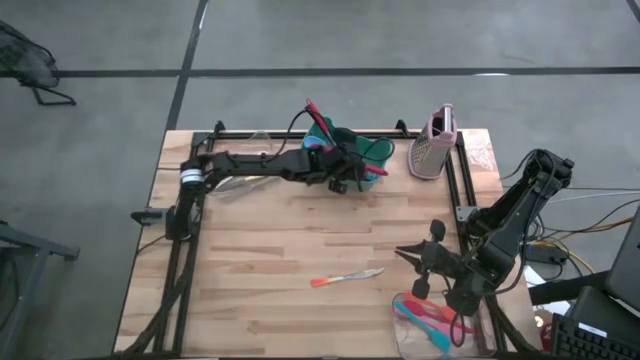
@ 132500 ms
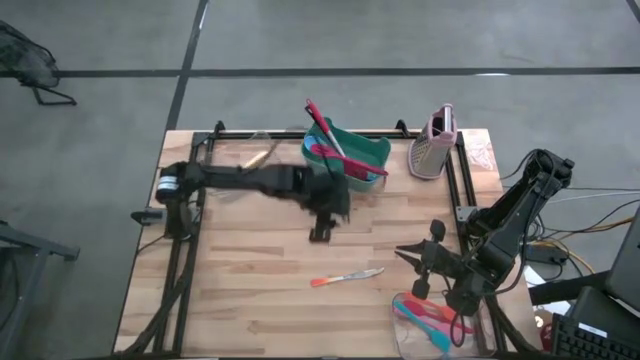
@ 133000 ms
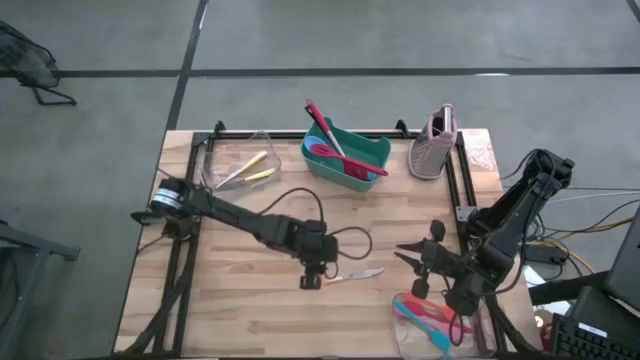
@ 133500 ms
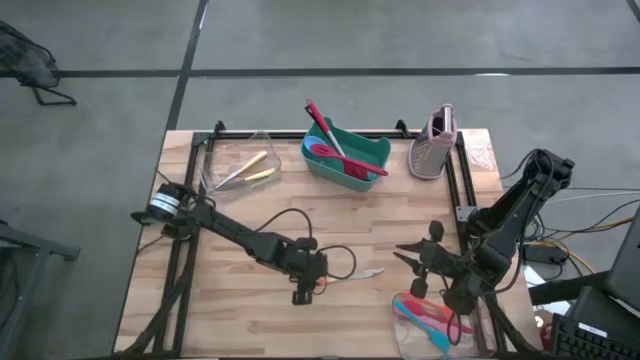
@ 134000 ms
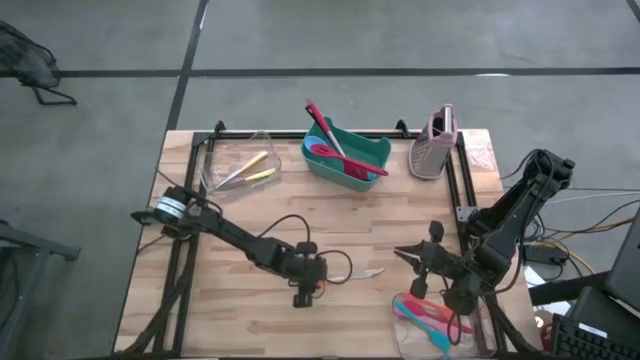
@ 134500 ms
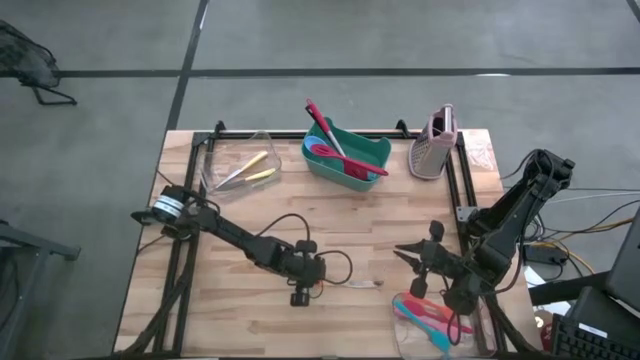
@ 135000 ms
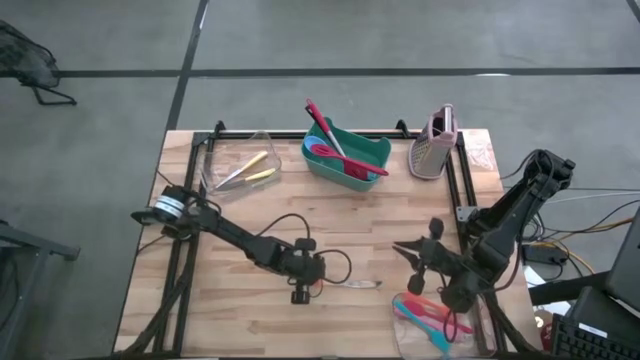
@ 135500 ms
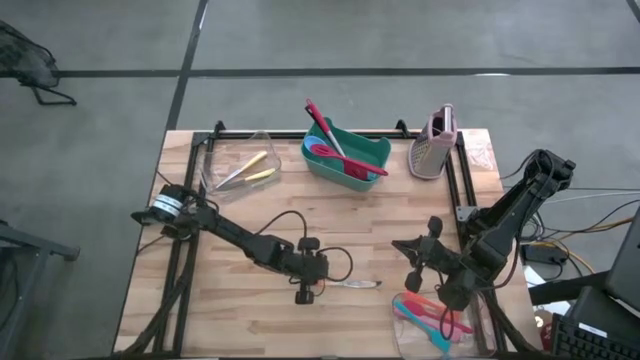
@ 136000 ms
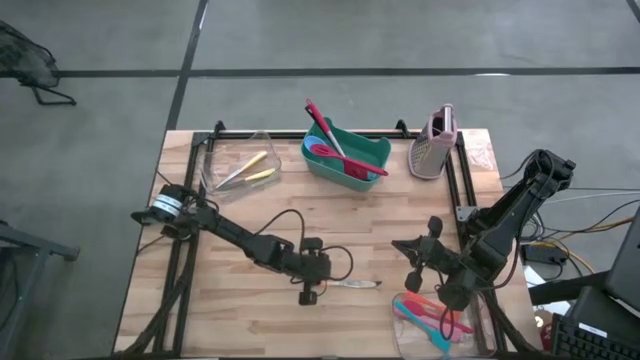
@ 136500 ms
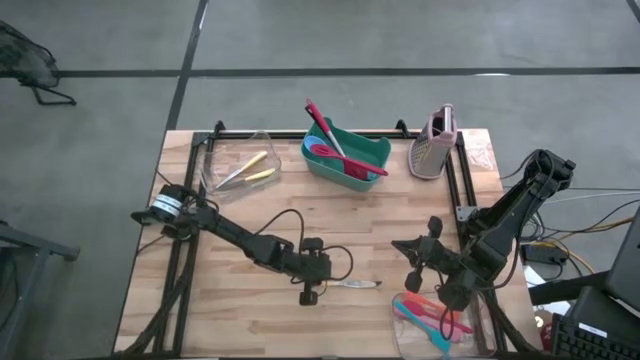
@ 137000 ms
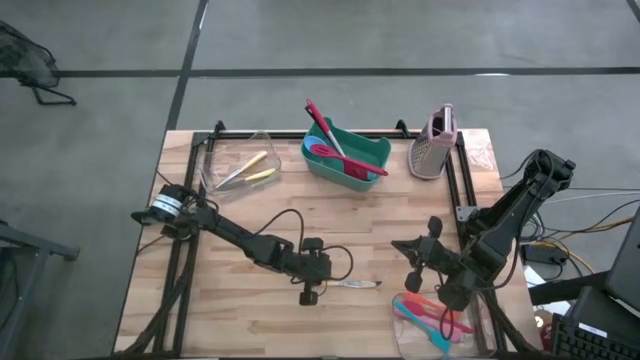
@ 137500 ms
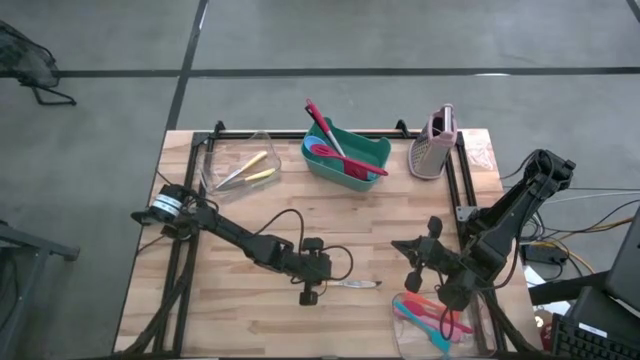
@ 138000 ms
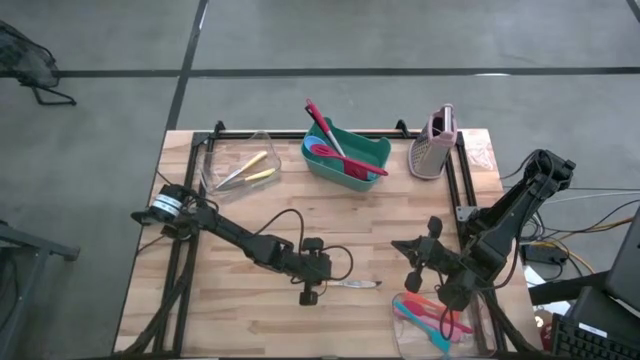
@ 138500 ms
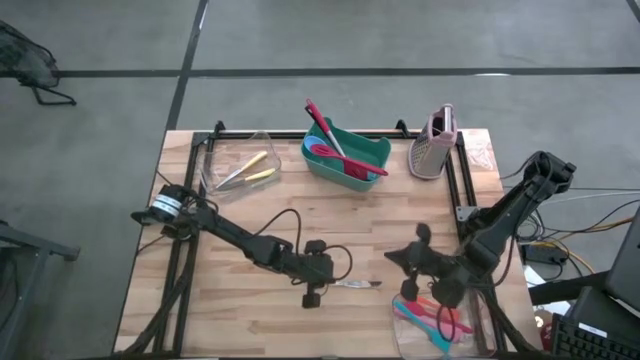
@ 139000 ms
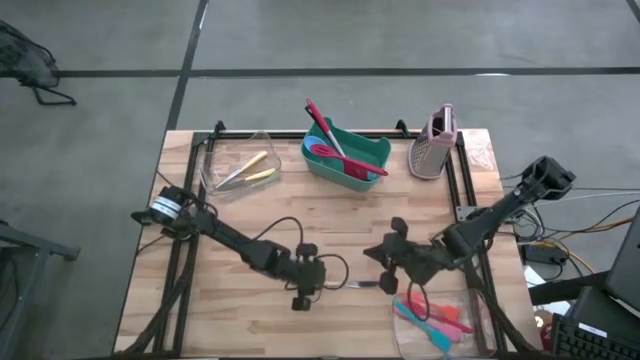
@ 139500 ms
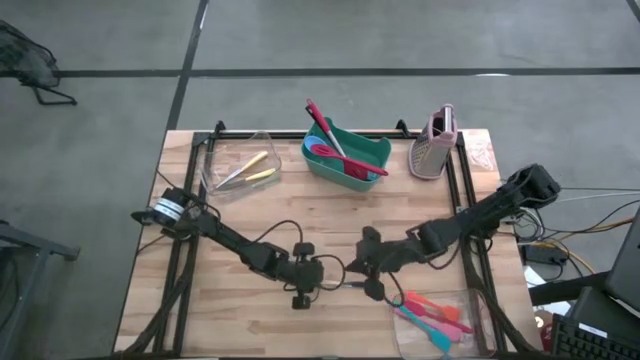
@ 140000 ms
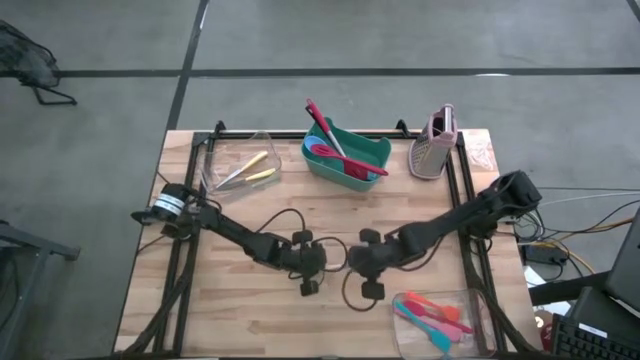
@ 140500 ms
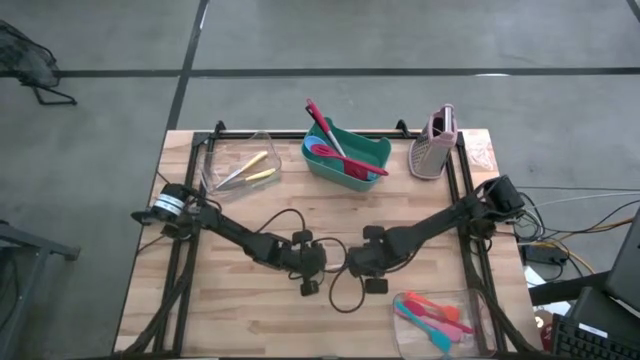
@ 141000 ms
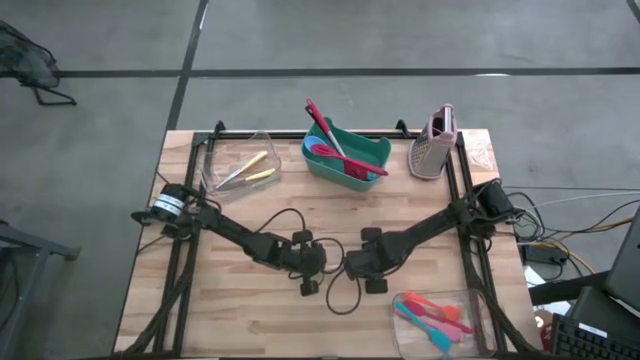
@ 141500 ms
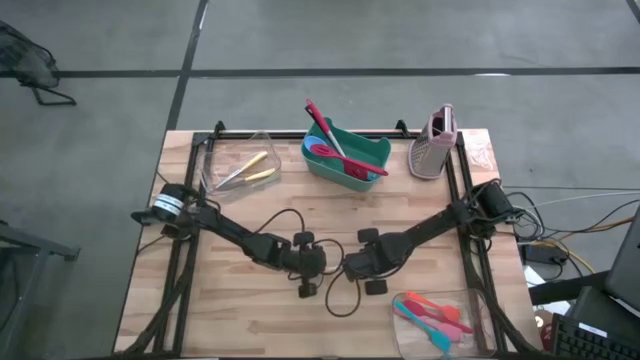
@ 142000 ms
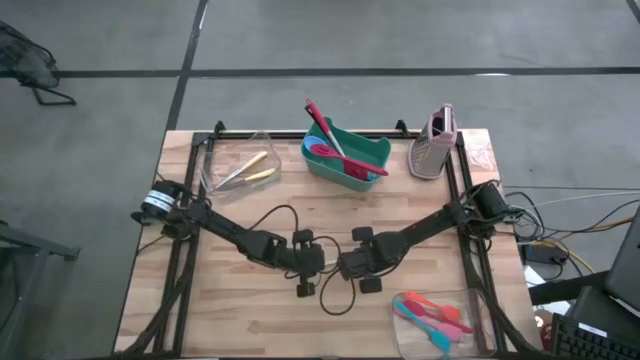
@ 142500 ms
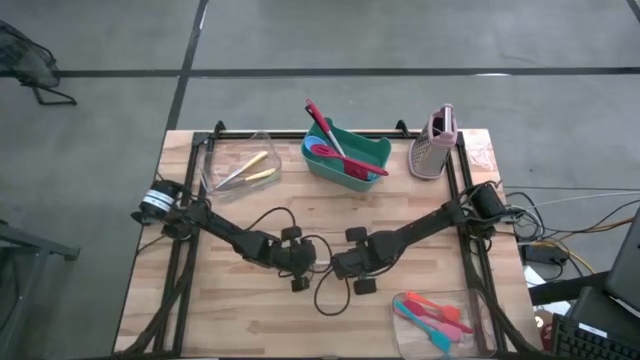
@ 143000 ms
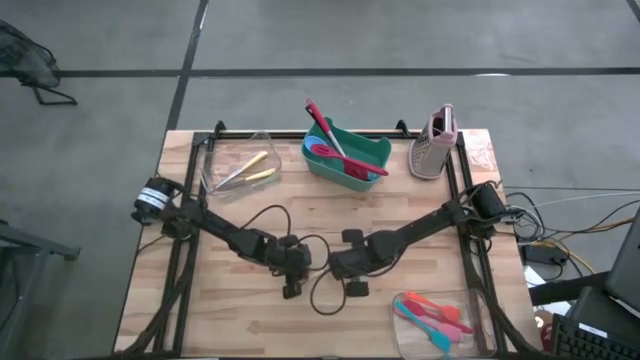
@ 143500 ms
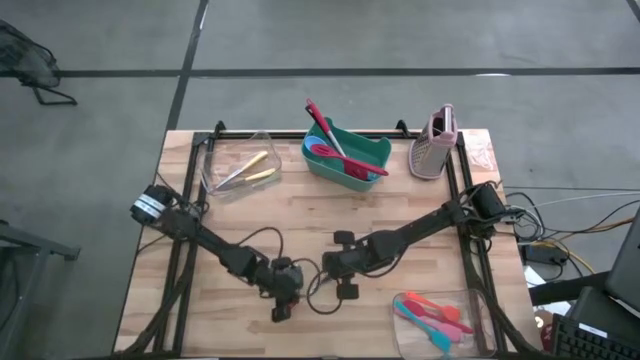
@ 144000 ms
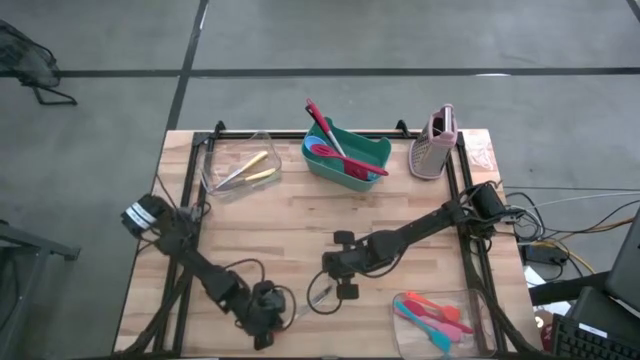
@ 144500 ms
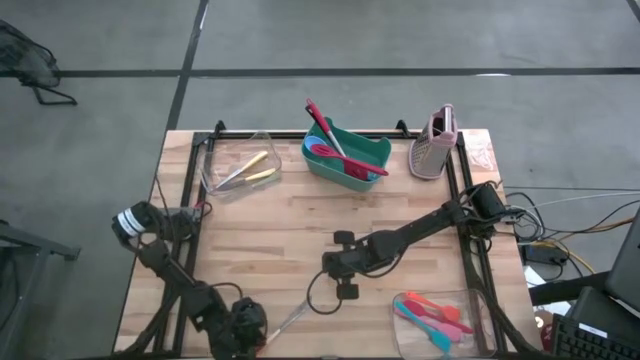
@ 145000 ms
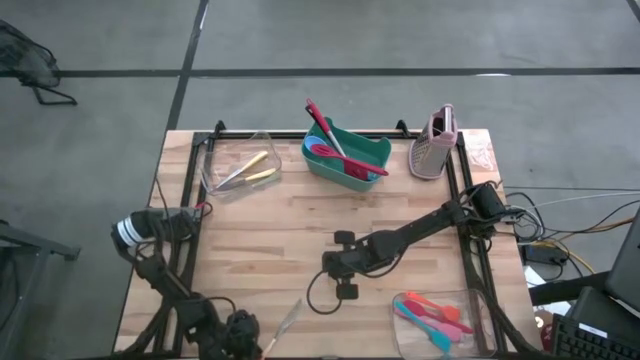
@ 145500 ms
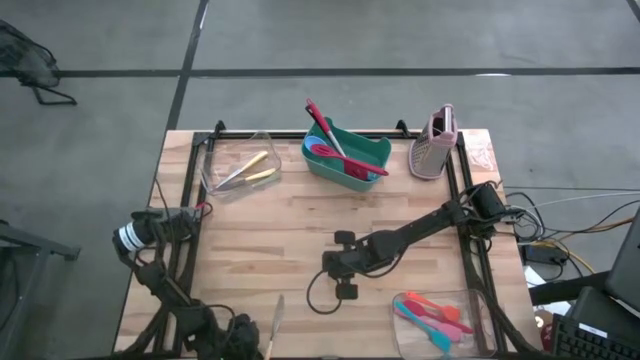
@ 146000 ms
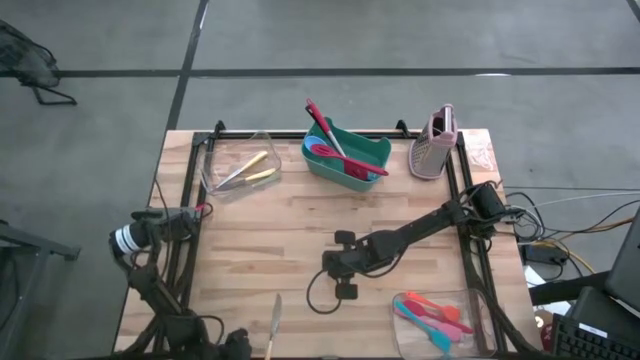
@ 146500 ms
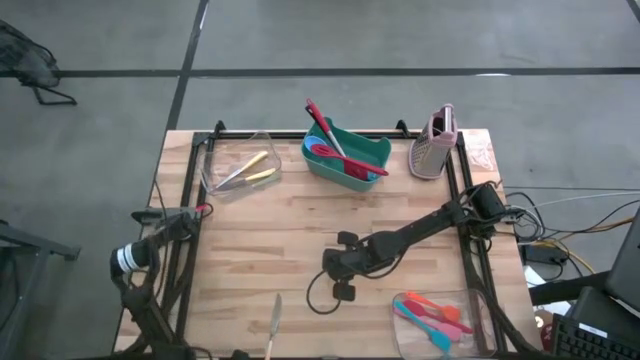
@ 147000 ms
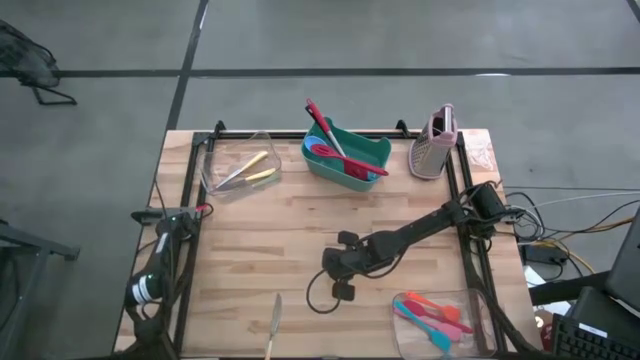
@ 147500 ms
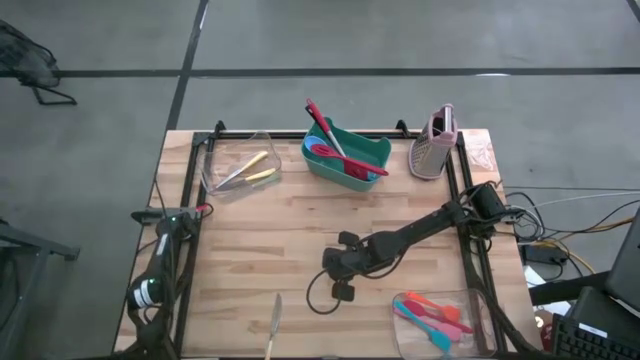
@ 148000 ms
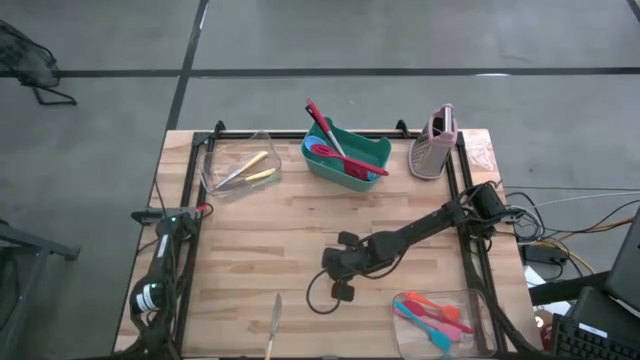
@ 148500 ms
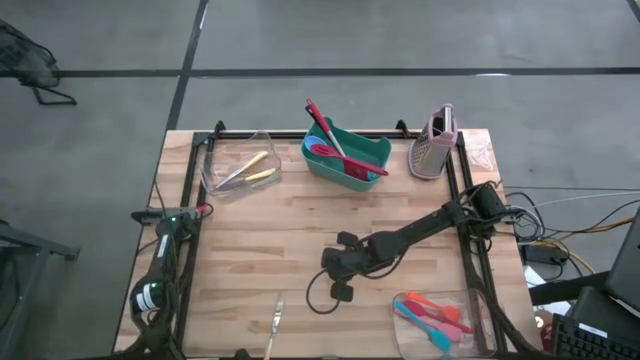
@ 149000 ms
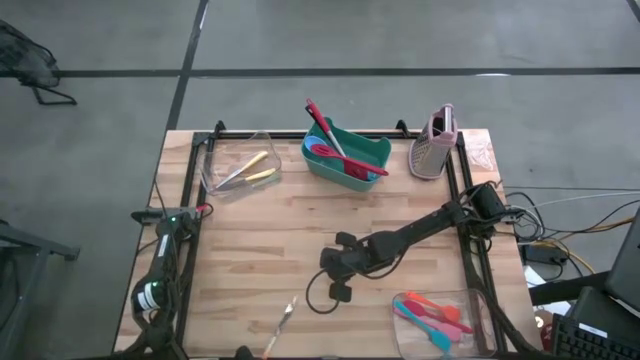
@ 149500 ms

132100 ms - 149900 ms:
Task: Pick & Place Kitchen Items
Put the orange table knife into the top transparent bin

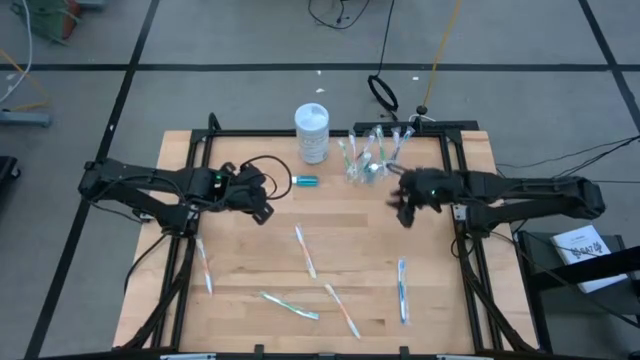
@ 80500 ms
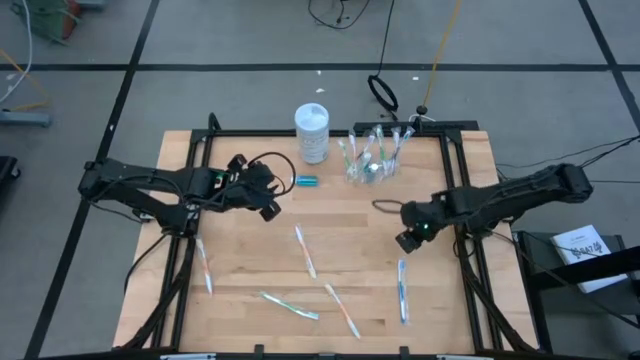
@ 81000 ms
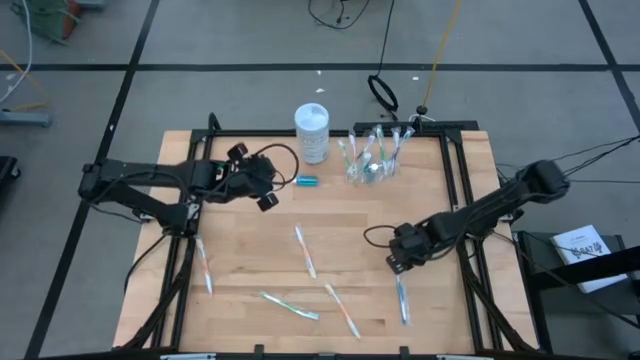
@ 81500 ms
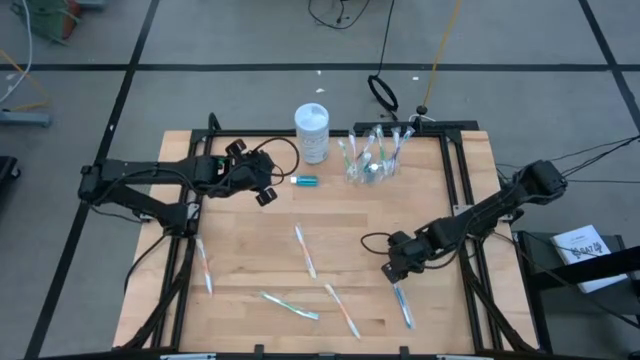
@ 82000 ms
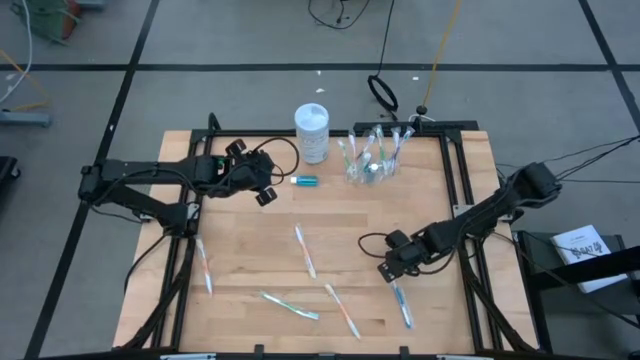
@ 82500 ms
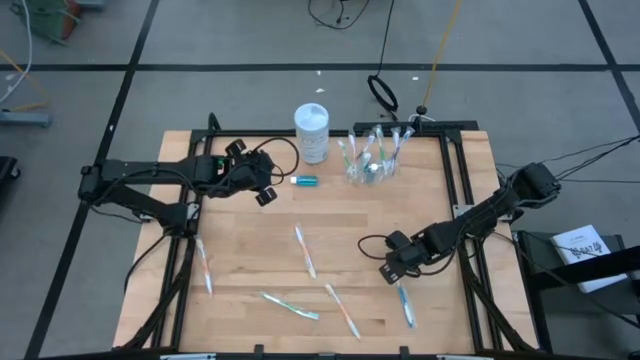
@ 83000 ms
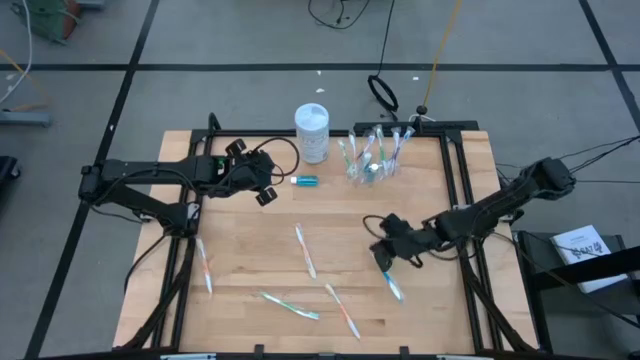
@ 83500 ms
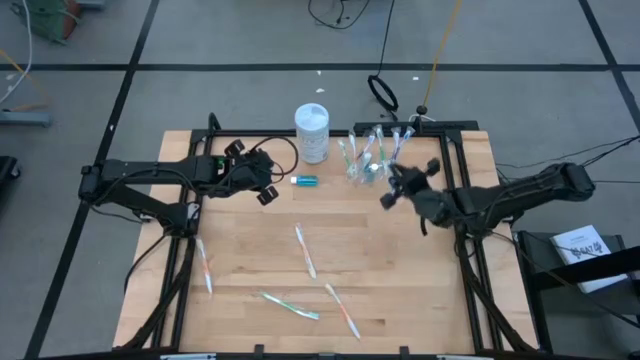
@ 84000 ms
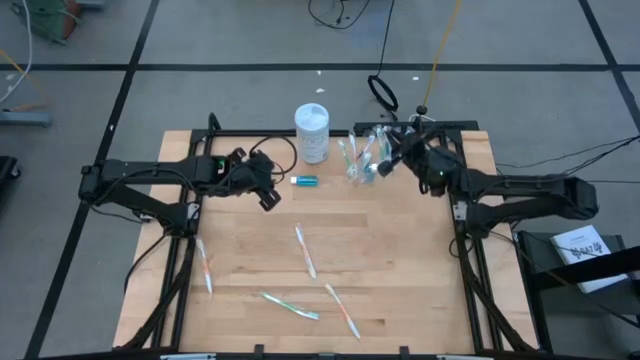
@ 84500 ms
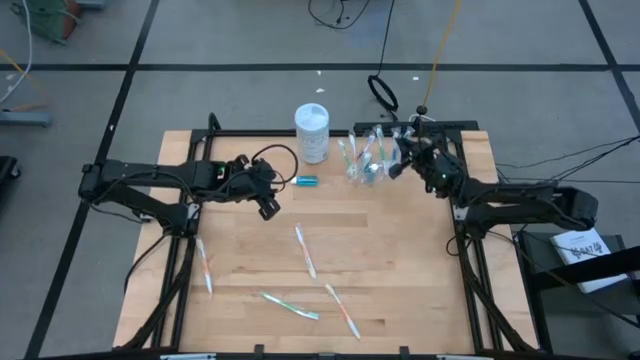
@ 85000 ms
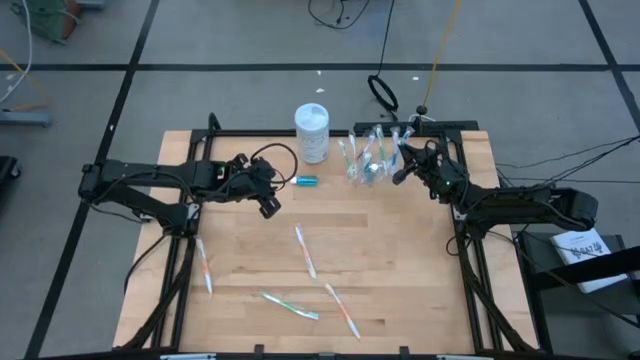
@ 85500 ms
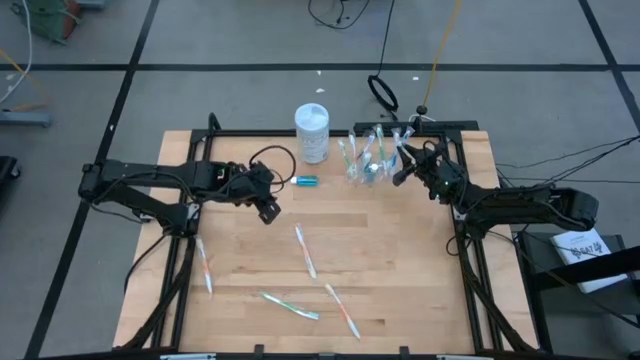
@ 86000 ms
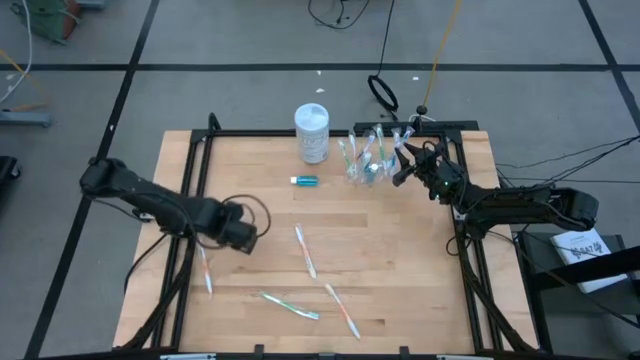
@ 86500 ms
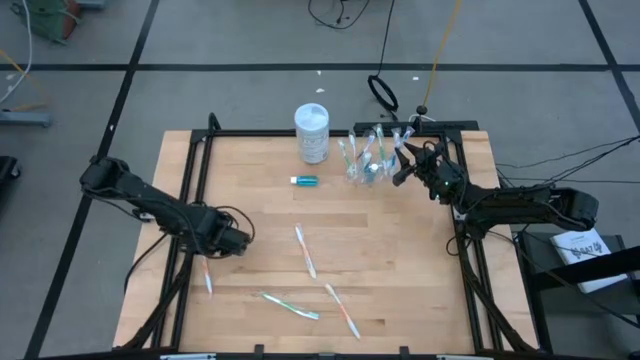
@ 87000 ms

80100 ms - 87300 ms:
Task: Pick & Place toothbrushing station
Put the blue toothbrush into the transparent organizer
